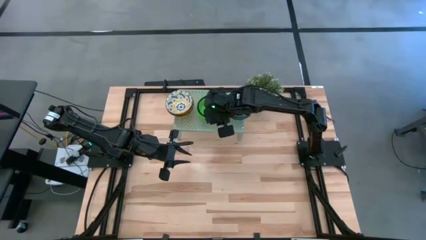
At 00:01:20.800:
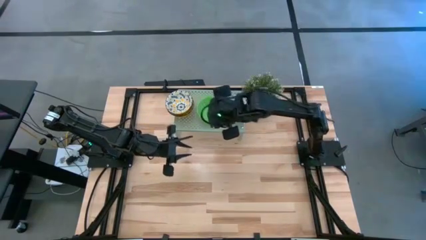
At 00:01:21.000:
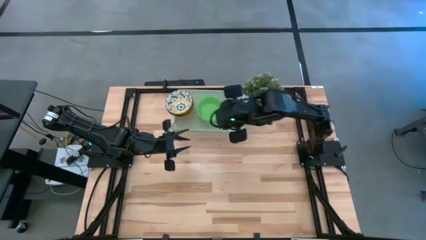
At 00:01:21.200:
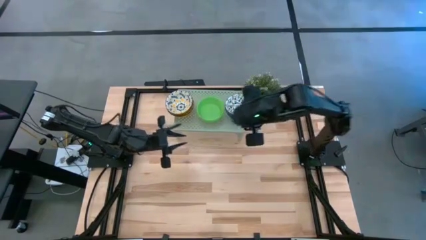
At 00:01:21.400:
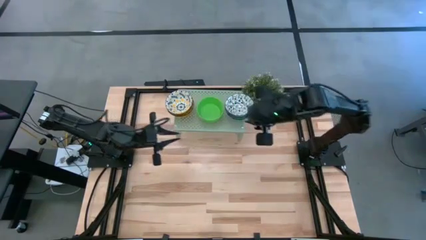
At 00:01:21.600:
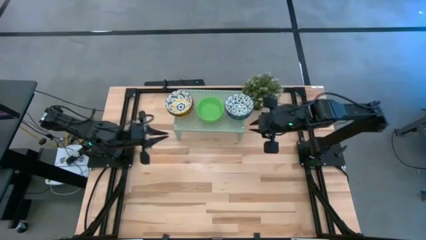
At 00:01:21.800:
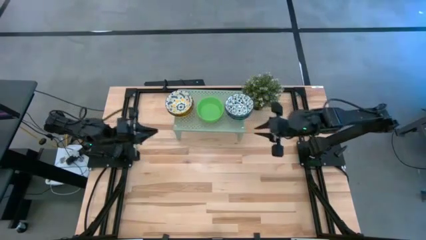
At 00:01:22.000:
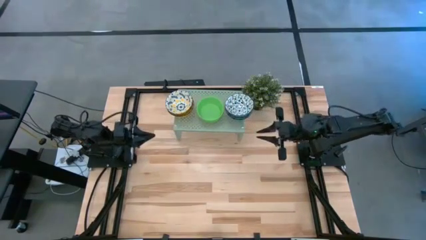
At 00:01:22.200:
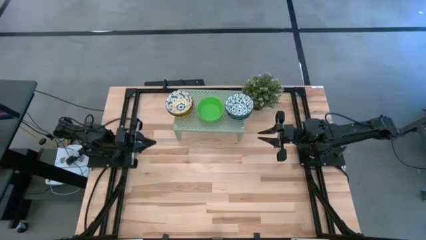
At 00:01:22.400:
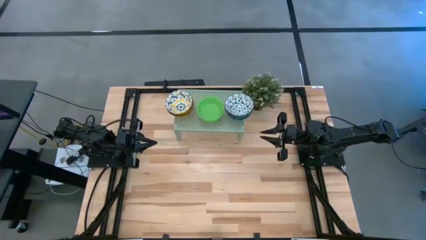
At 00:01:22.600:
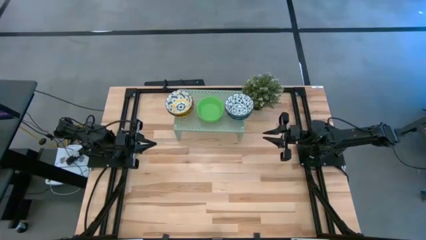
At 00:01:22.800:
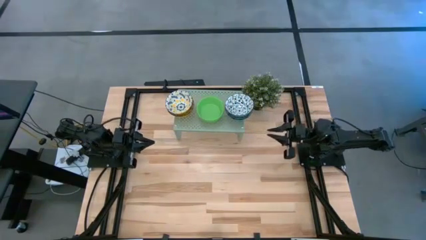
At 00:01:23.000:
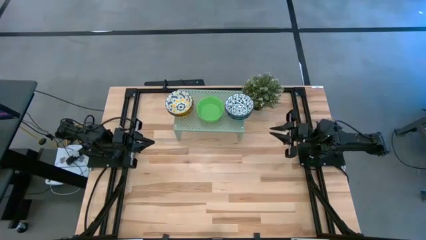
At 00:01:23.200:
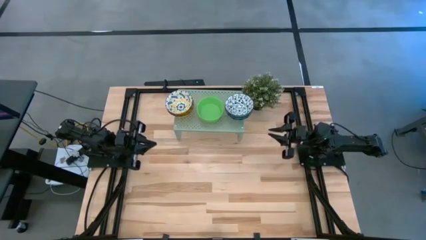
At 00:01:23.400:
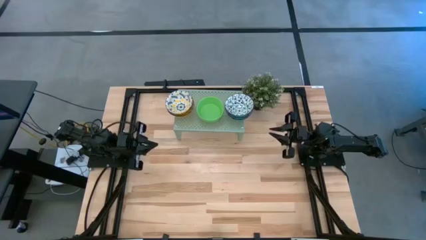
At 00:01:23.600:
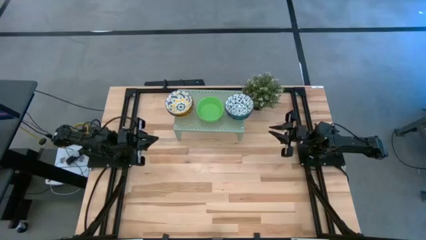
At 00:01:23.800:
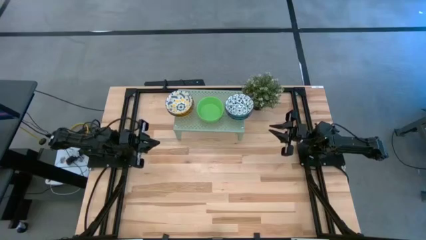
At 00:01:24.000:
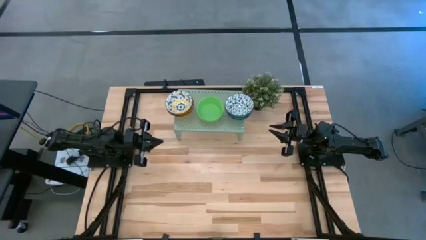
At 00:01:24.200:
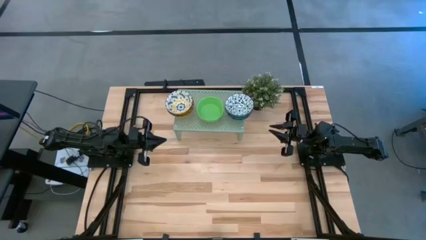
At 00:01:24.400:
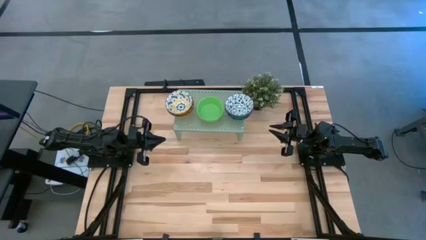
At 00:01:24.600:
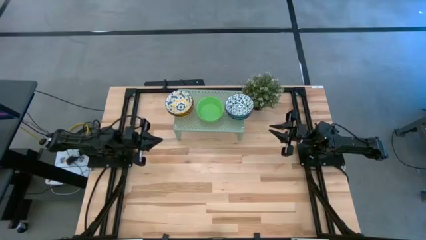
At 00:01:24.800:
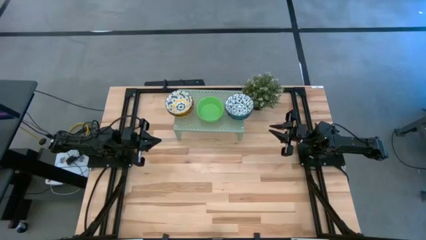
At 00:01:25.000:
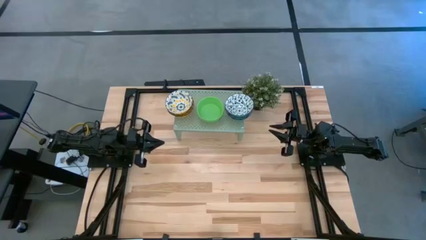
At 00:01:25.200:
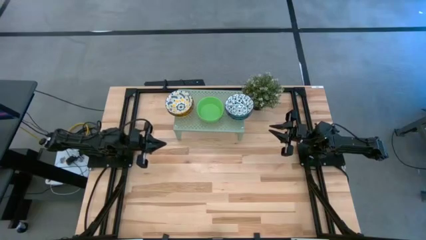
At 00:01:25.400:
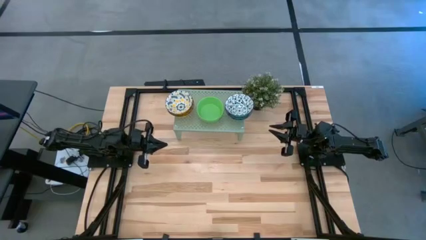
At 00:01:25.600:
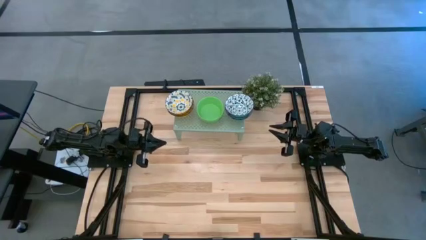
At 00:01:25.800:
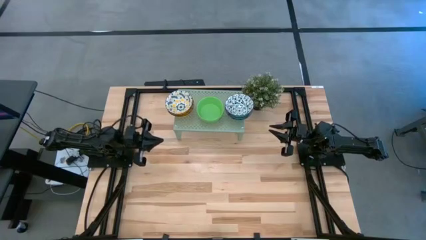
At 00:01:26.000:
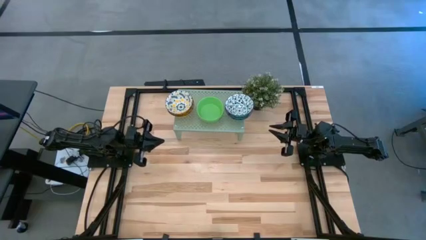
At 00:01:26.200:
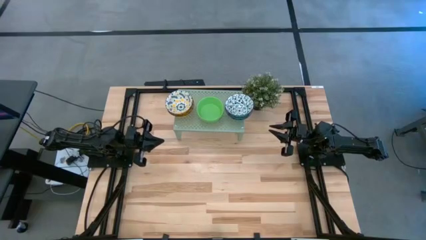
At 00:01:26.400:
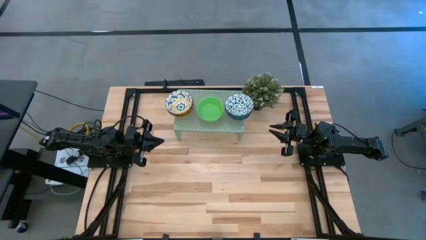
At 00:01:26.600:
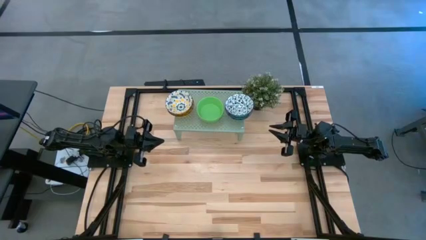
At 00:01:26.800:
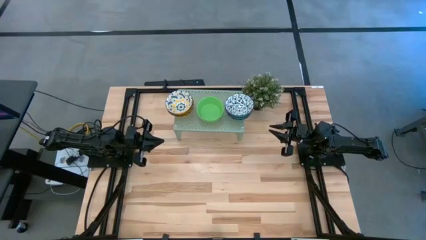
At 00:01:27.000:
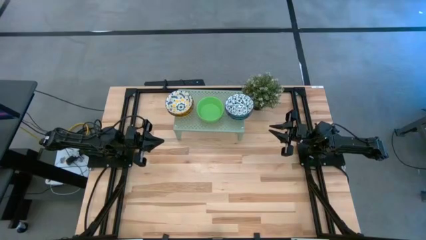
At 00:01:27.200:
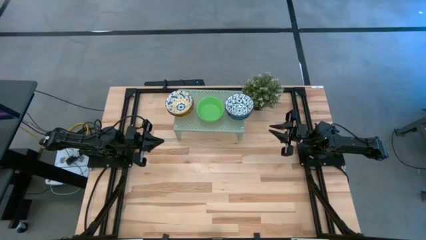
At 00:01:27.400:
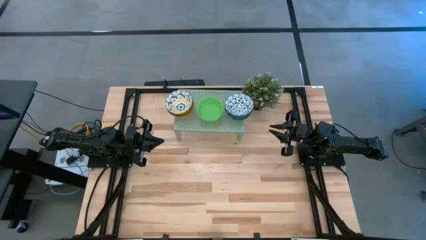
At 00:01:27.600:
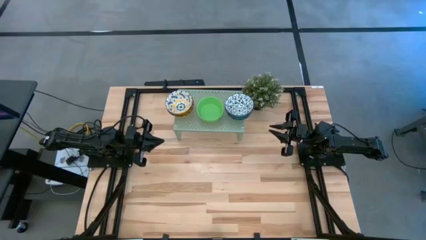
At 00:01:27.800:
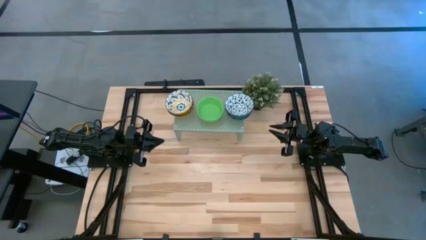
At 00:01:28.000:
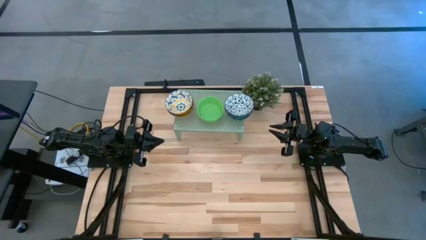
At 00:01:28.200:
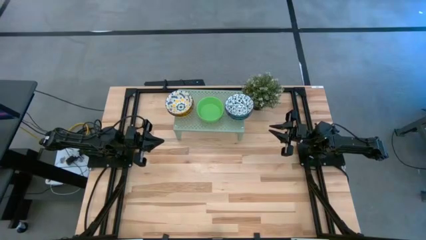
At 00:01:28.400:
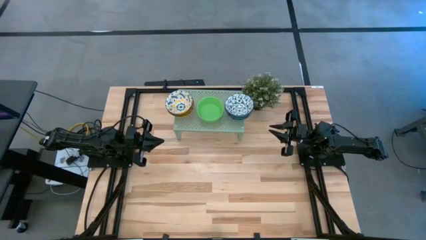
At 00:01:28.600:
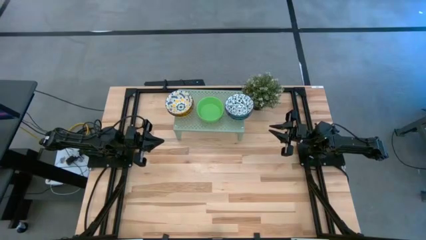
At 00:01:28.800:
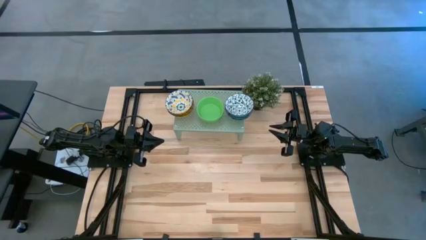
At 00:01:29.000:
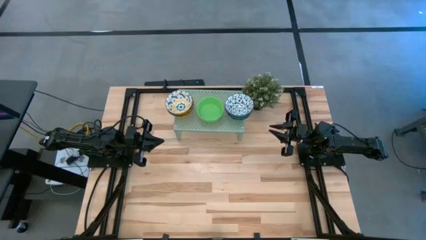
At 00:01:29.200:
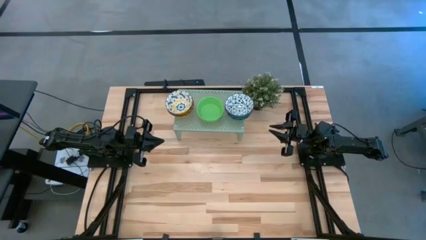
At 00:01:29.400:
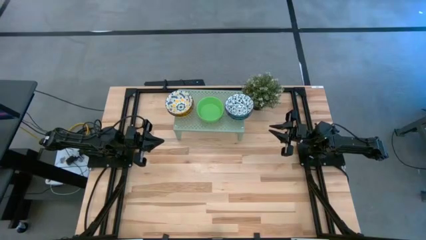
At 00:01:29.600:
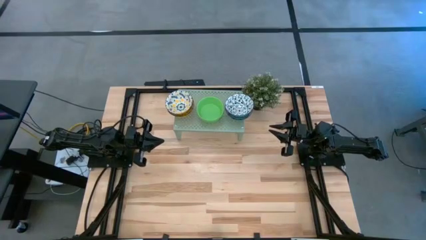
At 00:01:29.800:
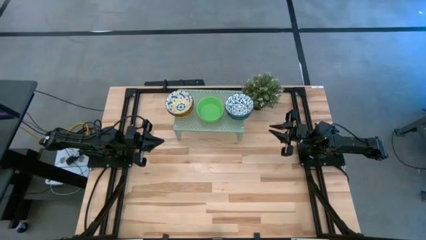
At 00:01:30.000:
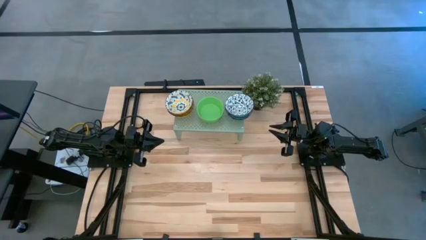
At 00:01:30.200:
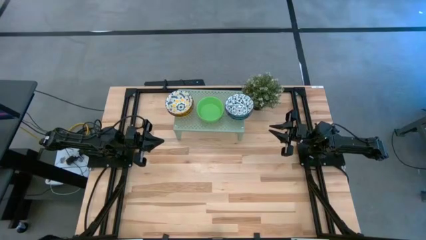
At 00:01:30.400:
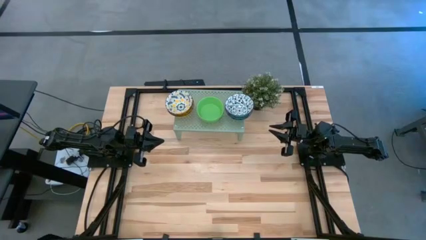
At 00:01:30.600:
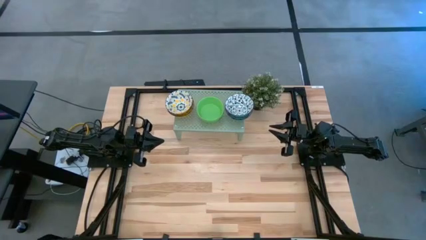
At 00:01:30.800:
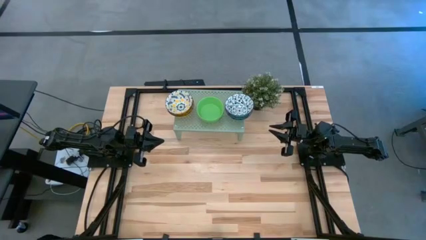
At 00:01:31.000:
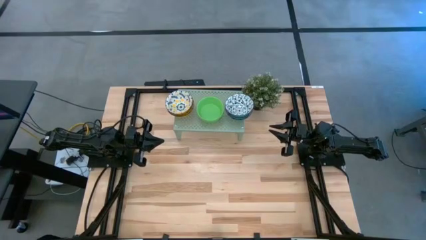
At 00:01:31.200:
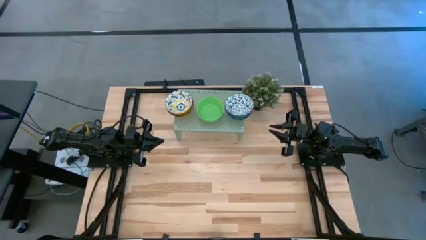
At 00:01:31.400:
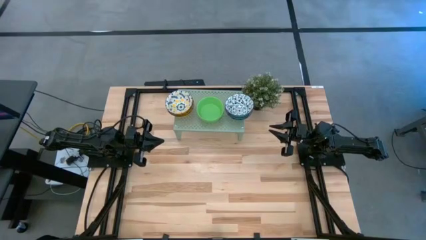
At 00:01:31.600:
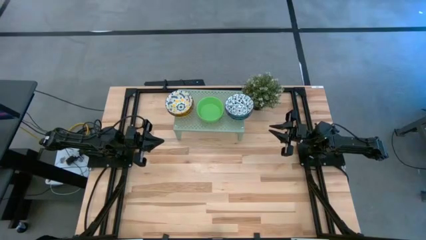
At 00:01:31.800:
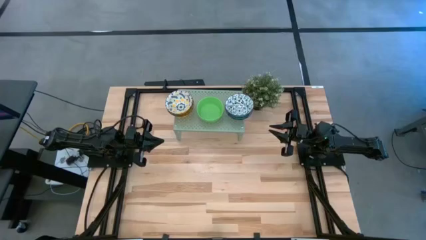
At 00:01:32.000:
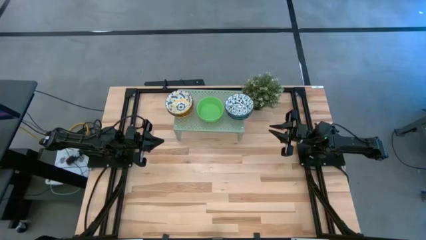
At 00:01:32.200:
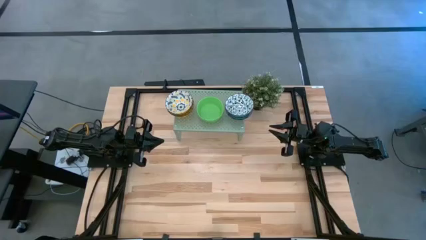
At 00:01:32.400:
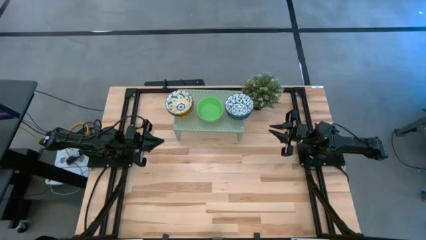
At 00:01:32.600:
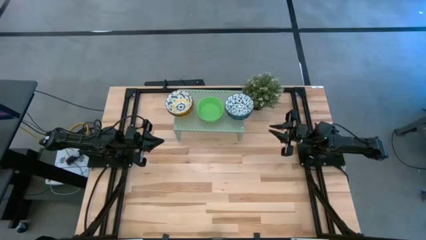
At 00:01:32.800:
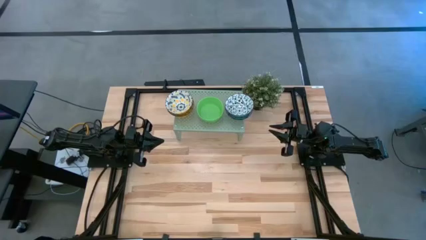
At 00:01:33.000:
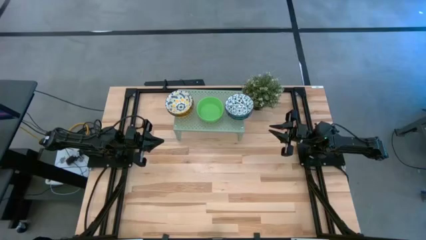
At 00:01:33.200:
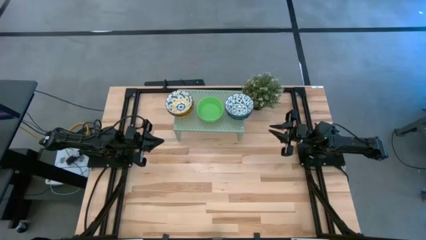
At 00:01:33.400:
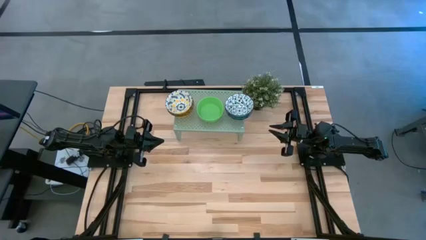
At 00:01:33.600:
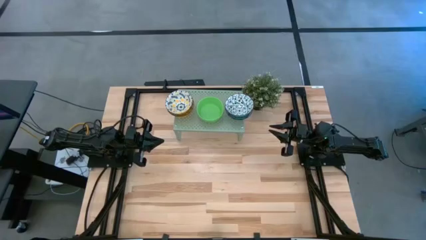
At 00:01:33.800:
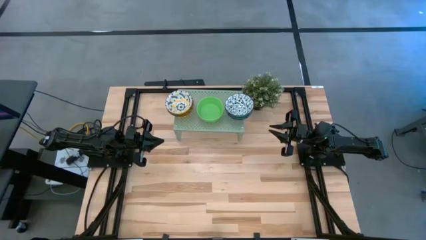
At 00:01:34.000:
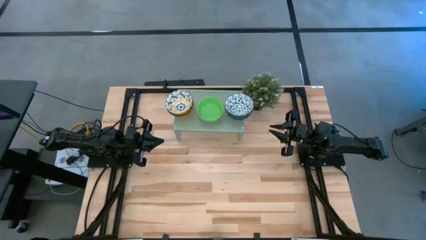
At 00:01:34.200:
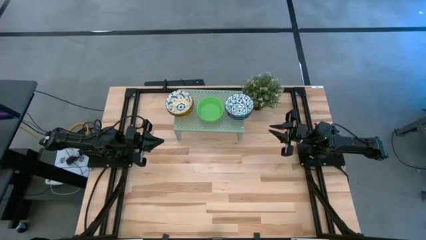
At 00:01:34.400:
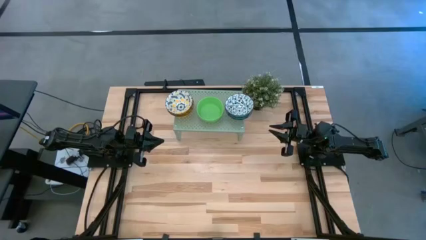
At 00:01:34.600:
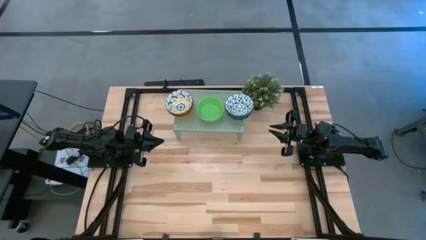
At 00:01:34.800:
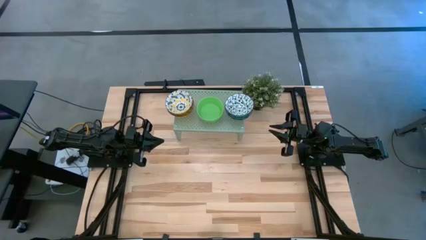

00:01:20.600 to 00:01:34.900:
Task: Pick & Place Mini bowls
Return to Home Position

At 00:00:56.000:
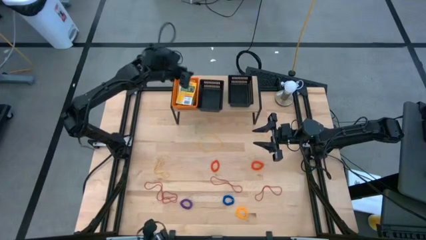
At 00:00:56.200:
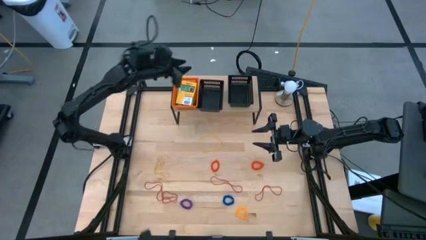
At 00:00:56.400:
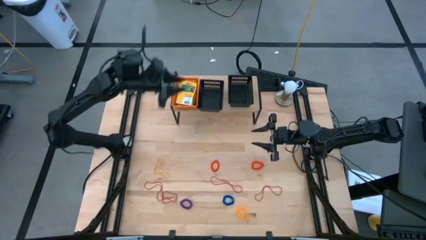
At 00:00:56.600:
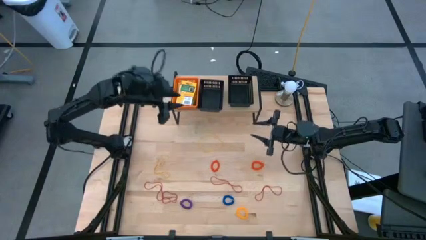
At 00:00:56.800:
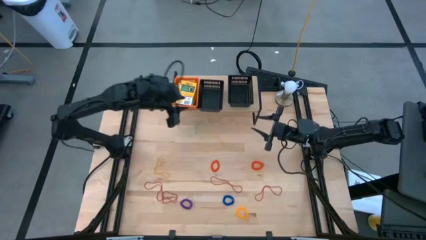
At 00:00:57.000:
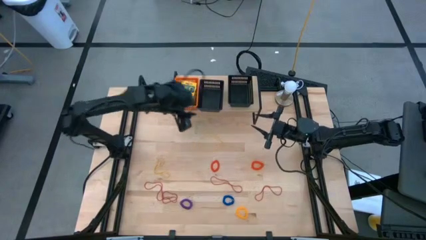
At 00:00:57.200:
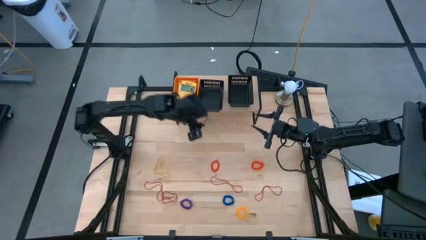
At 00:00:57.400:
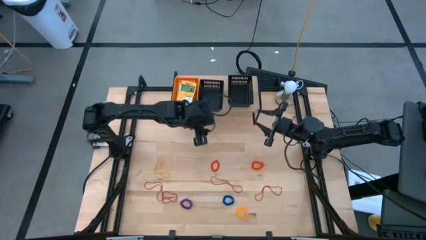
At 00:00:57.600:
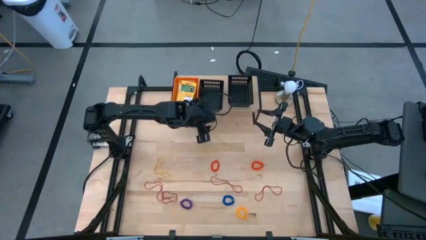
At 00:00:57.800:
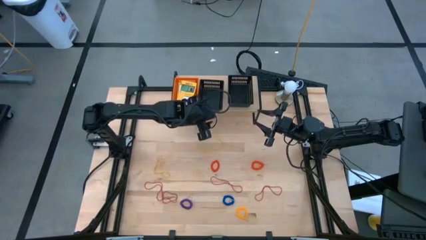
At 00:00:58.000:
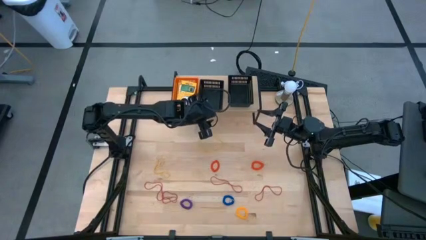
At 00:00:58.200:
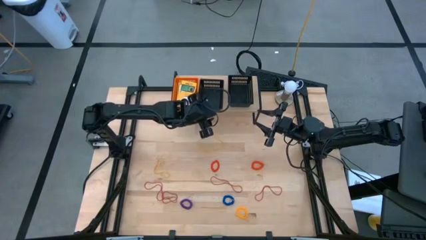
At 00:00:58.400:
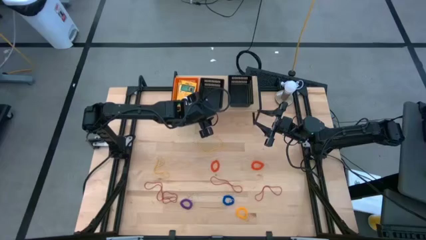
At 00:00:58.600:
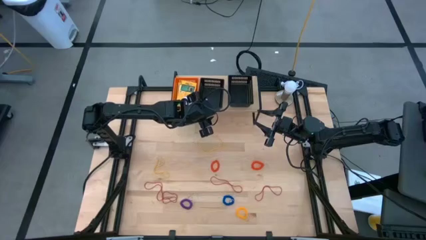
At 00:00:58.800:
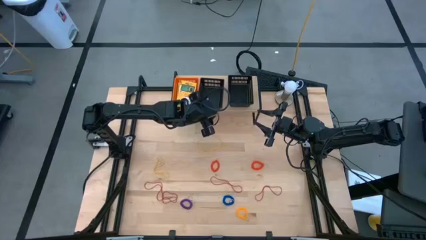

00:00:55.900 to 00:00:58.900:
Task: Pick & Place Office Desk Supplies
Adjust the left black bin on the shelf
